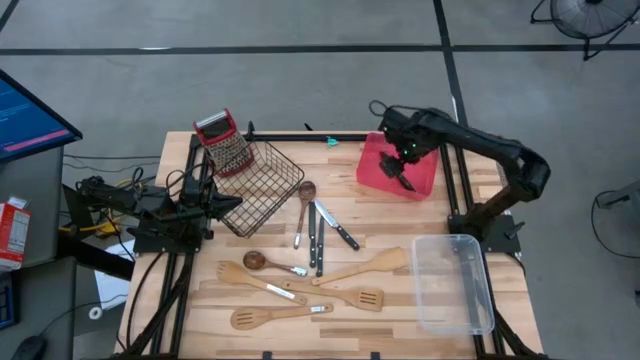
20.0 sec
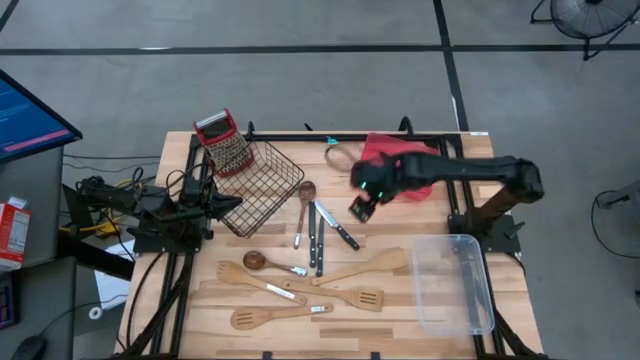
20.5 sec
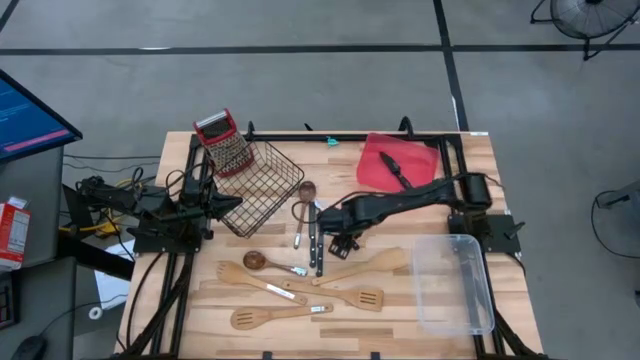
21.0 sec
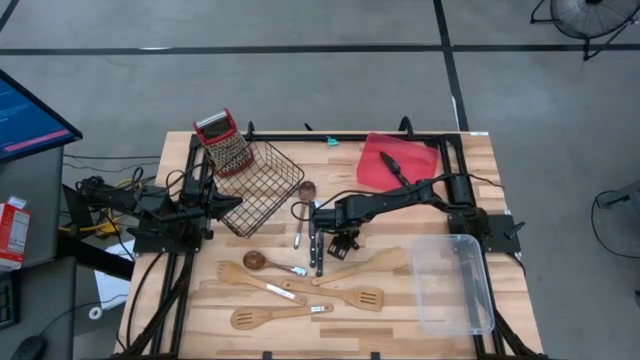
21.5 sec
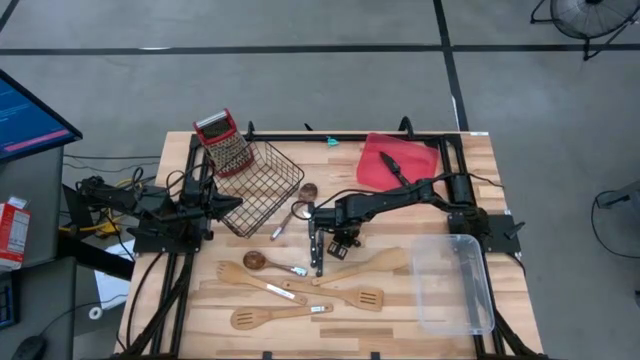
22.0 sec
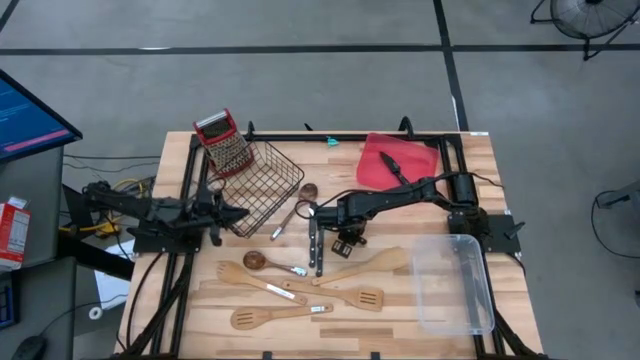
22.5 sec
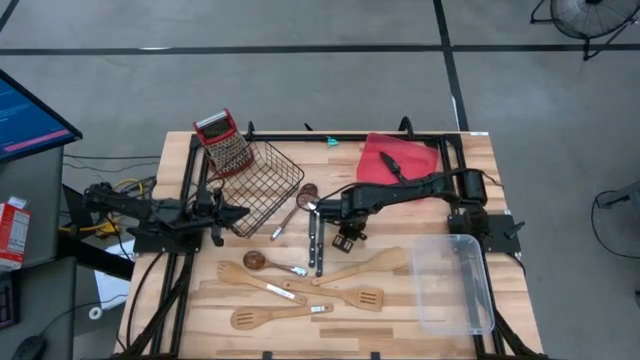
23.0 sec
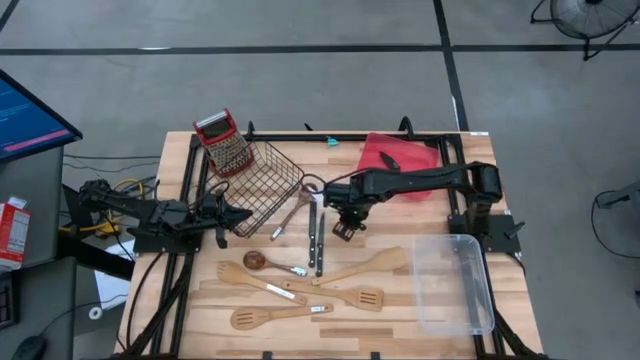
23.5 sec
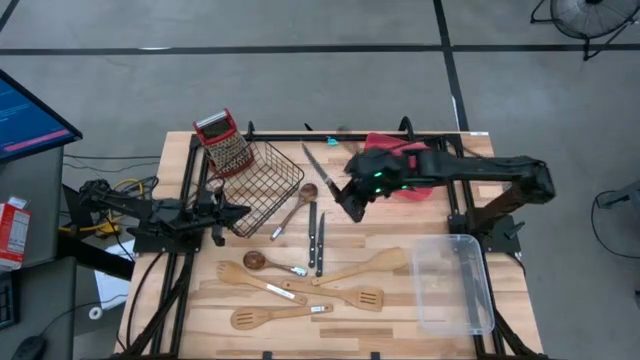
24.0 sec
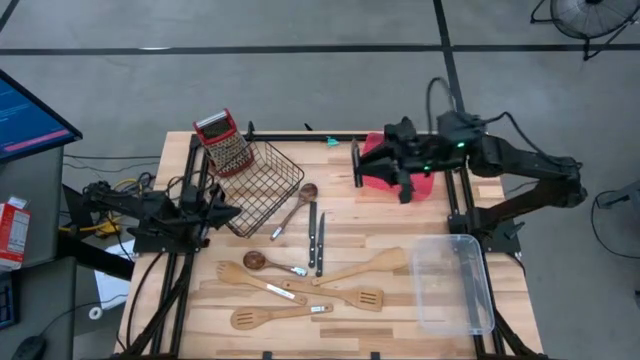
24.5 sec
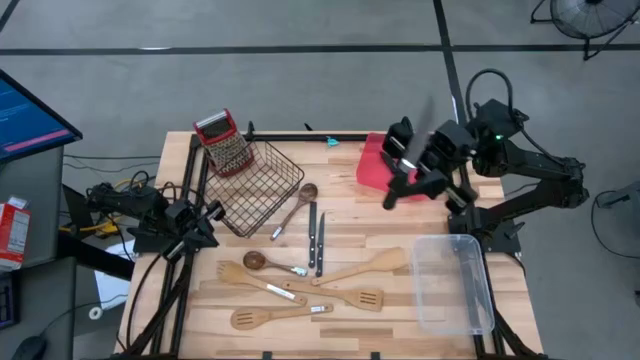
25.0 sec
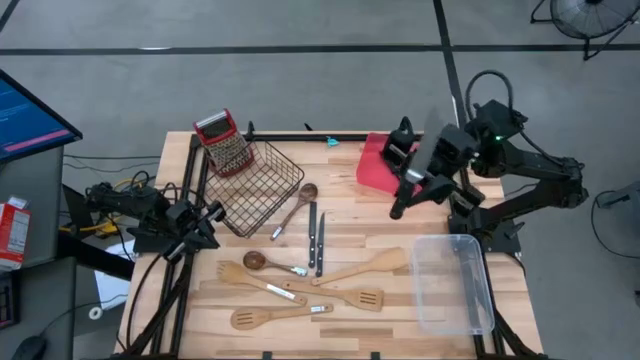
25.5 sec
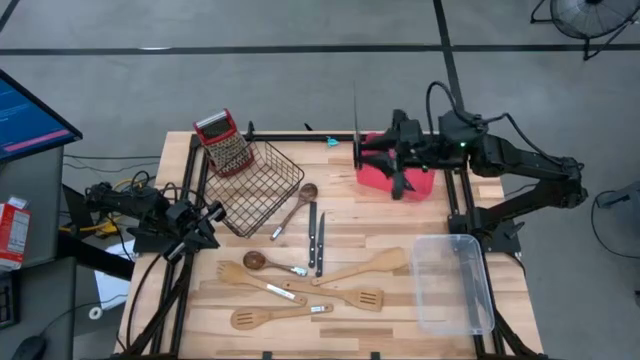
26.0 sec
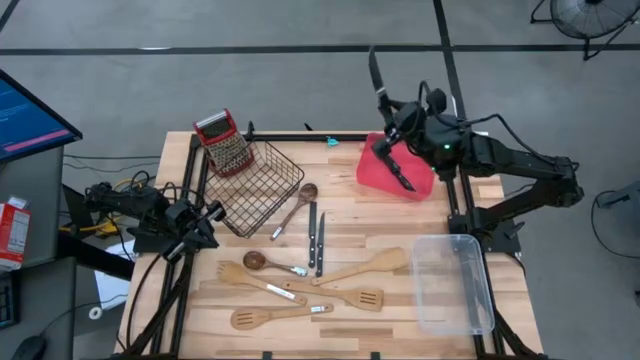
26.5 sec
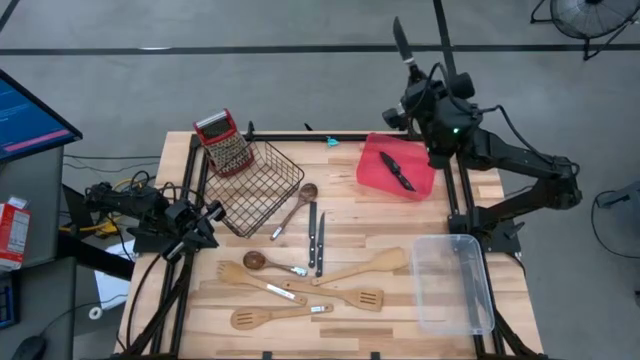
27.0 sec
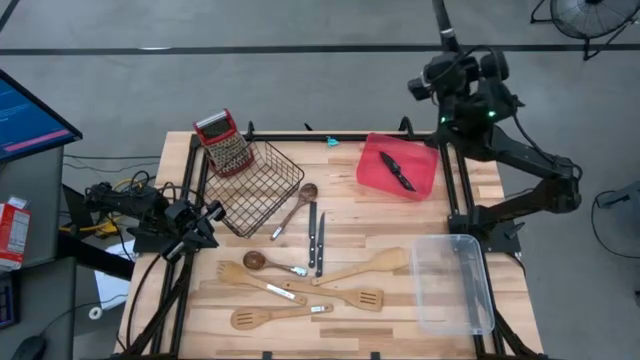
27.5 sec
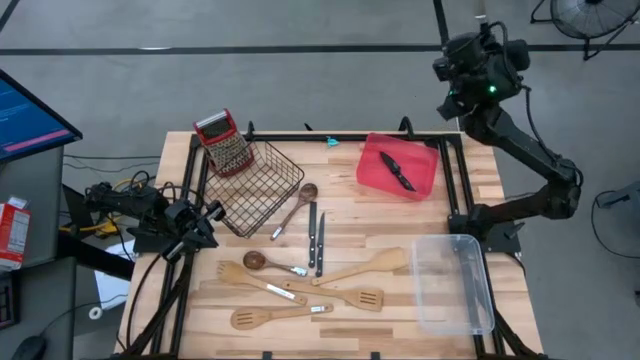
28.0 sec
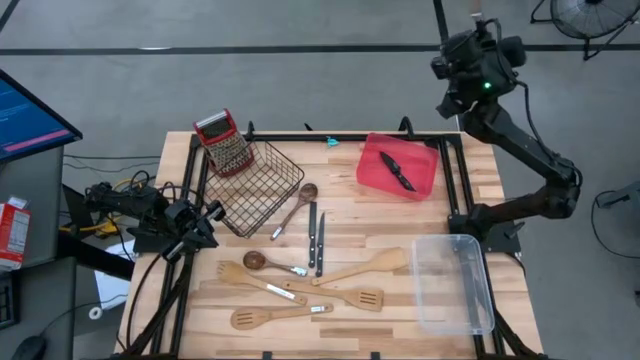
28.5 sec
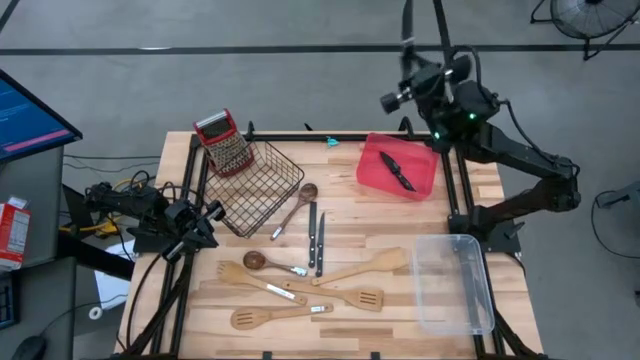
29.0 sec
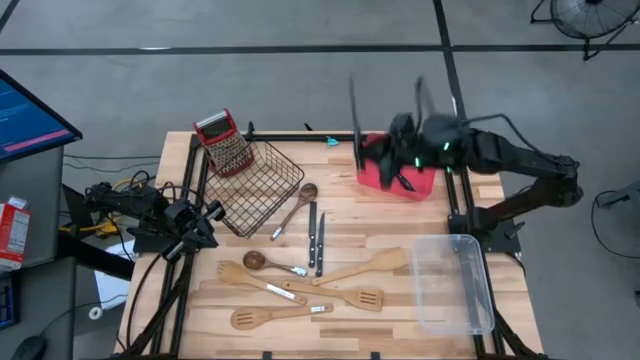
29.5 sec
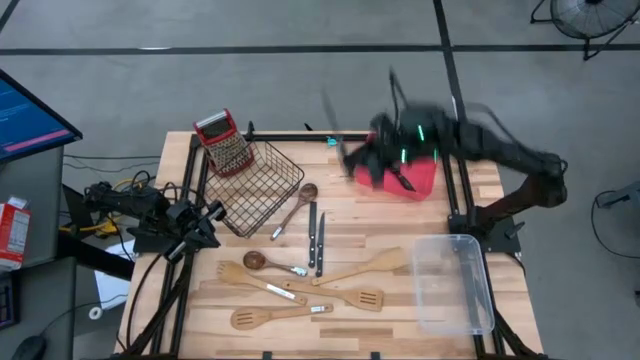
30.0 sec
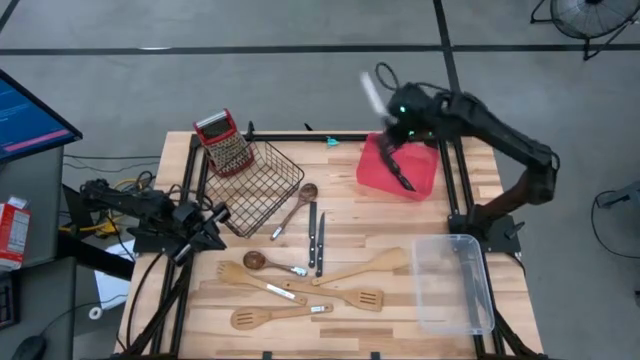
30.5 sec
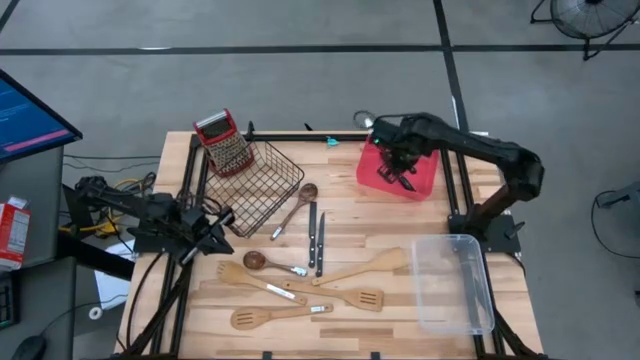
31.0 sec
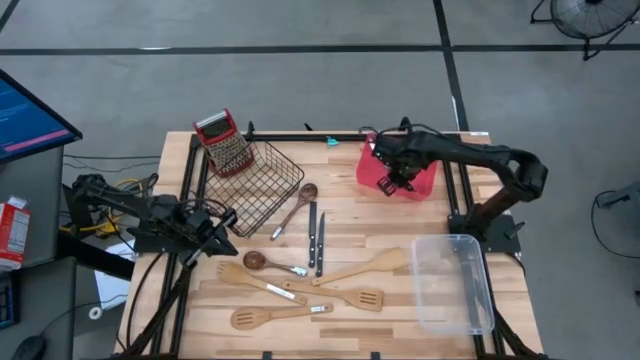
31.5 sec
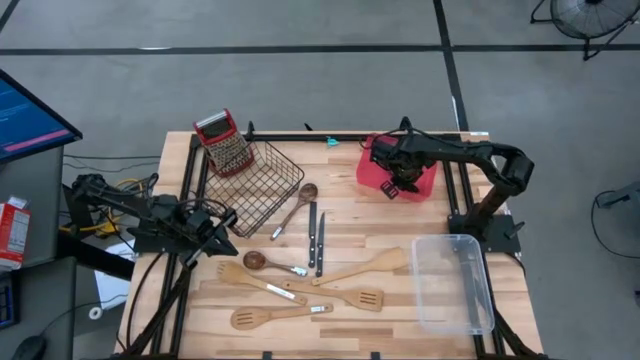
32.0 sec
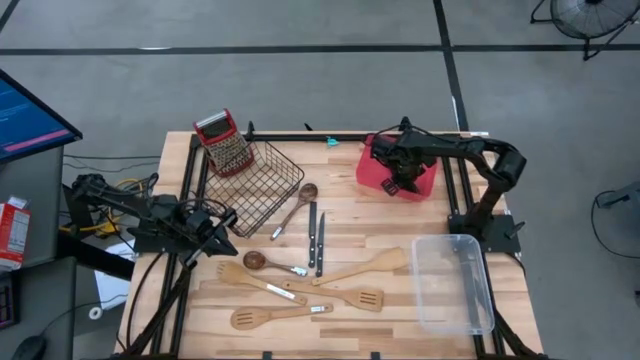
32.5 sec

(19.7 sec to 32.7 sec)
Task: Pick & Place Kitchen Items
Put the silver knife into the red bin

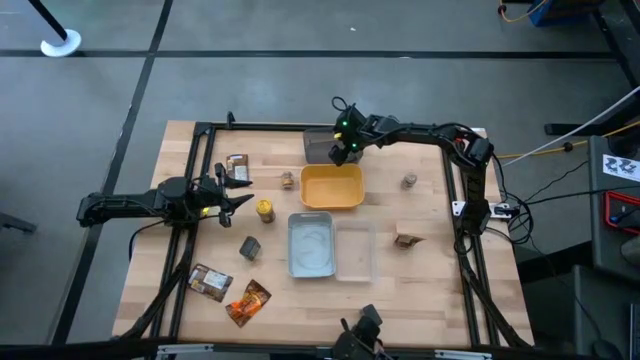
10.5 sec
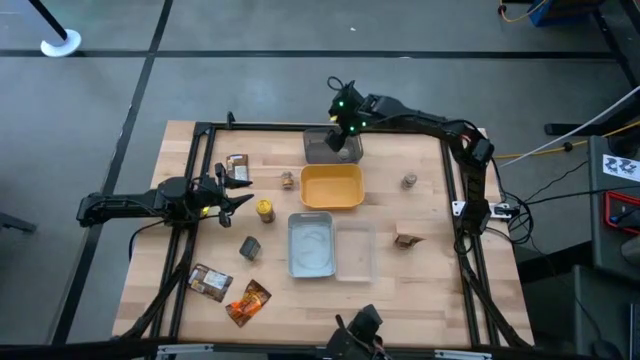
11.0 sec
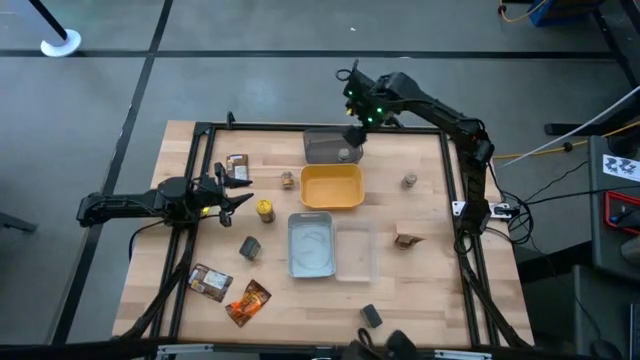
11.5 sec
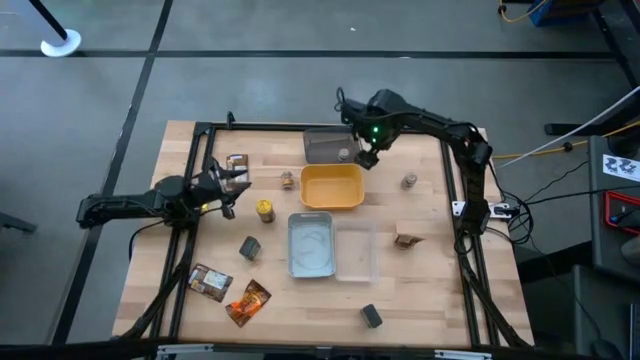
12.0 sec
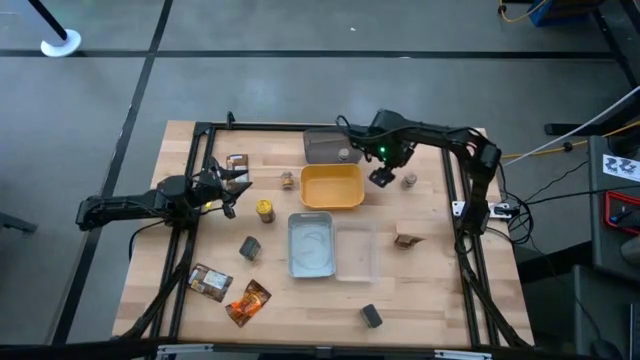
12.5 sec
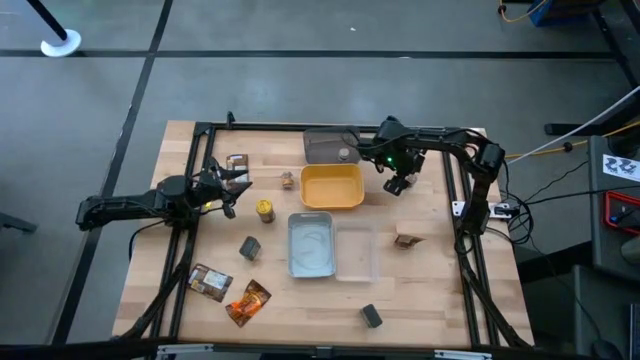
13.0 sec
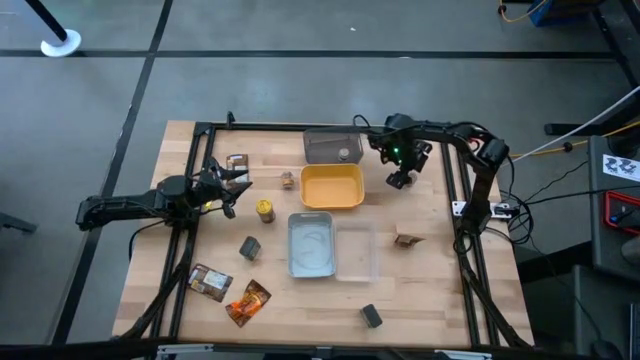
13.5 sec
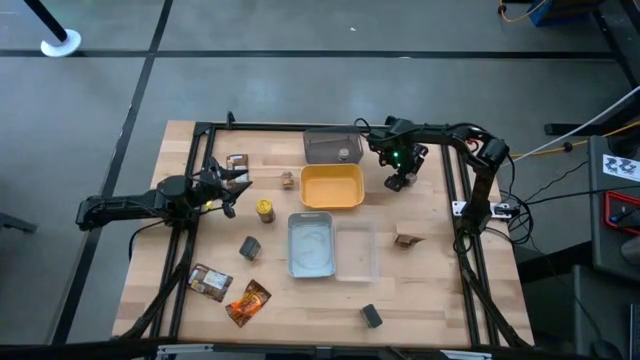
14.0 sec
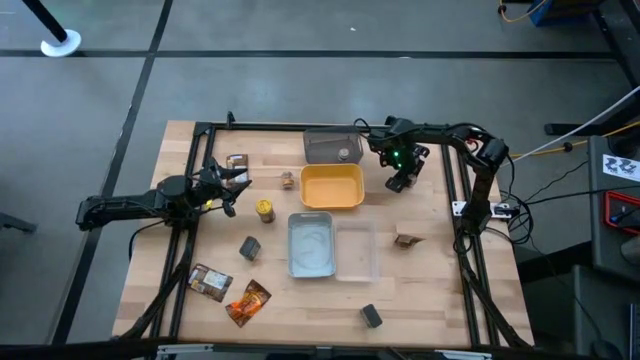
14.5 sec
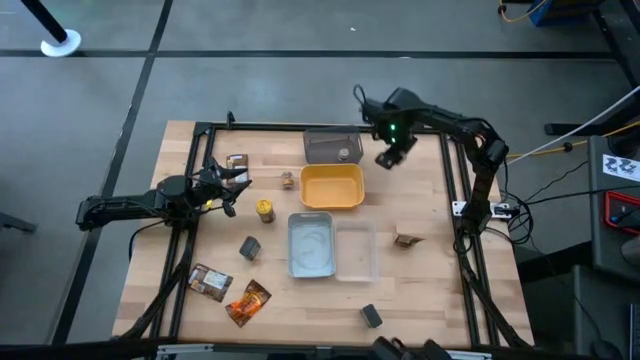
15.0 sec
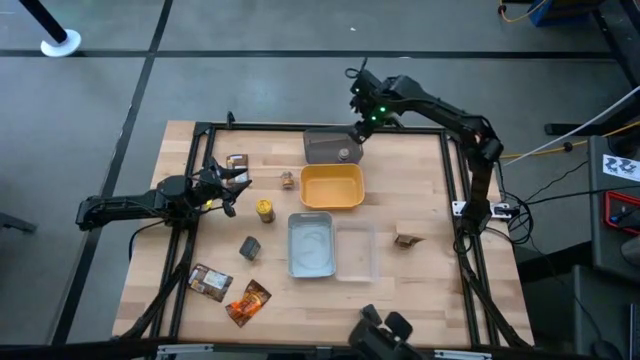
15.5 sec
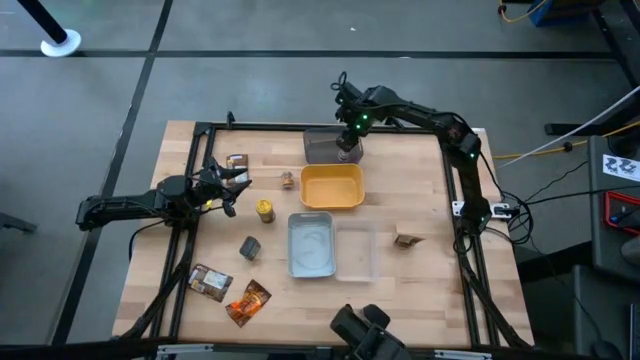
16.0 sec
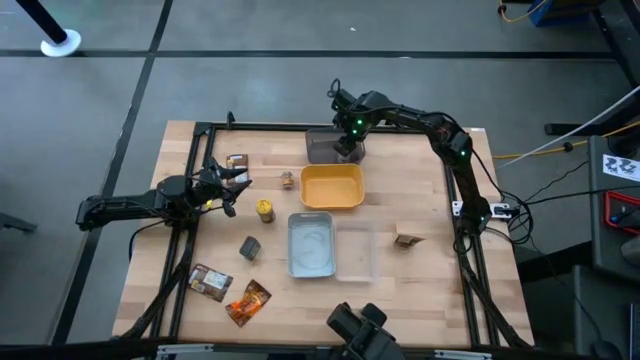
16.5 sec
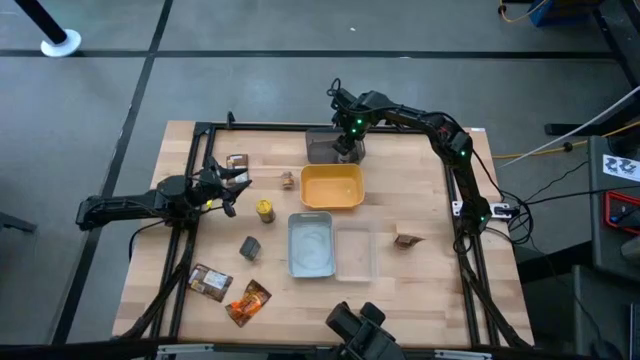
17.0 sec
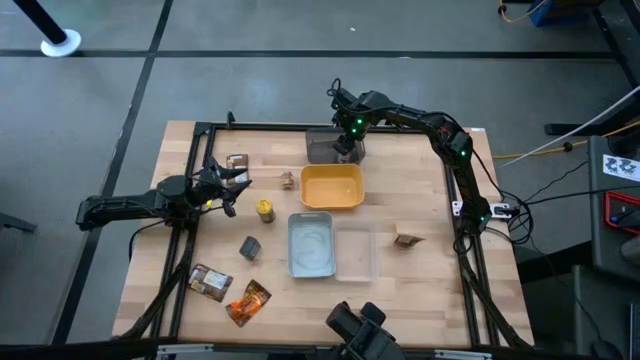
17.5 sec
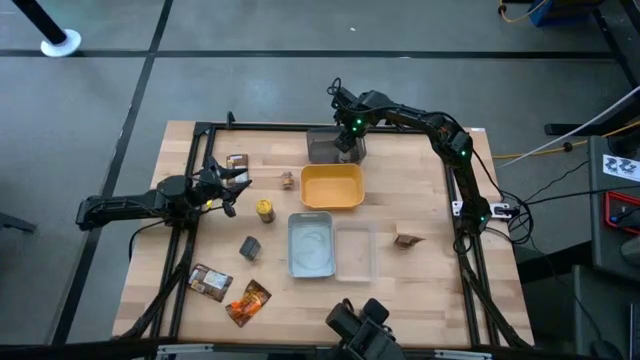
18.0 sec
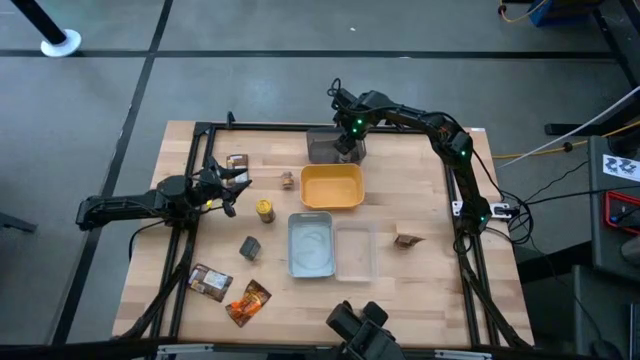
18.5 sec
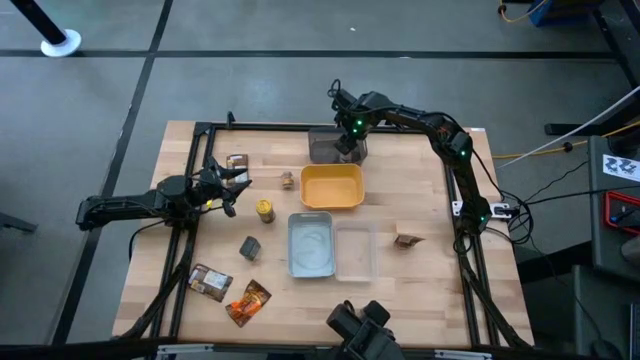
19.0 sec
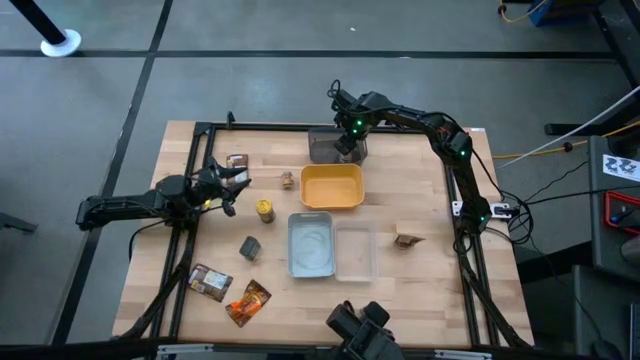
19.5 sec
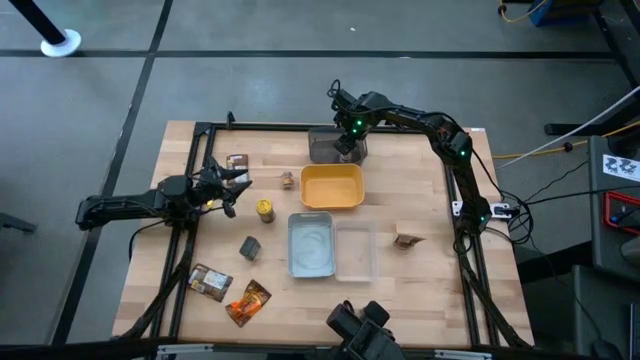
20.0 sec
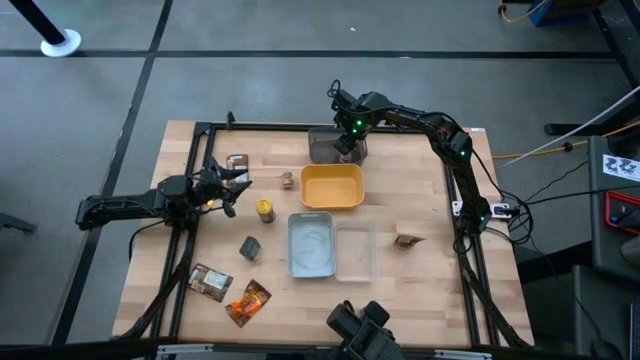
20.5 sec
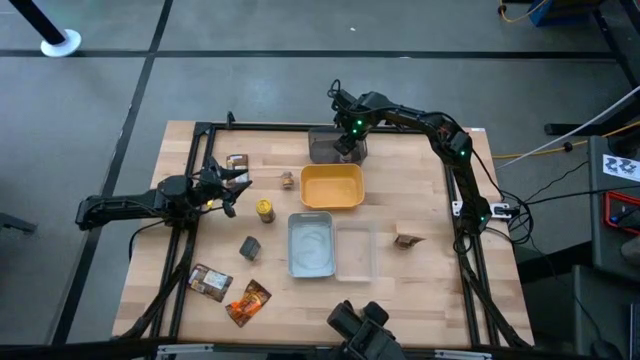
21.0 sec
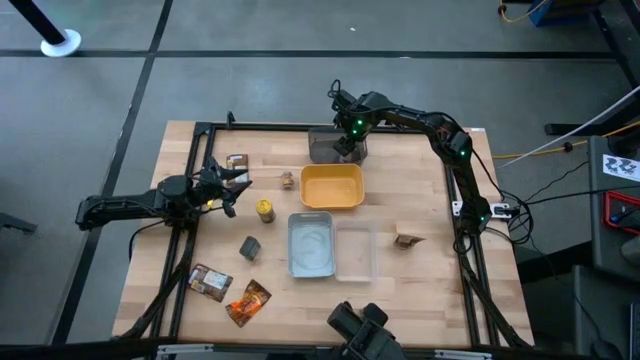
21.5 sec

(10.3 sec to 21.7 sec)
Task: Sort spices by type
Put the right brown seasoning bottle into the black bin
